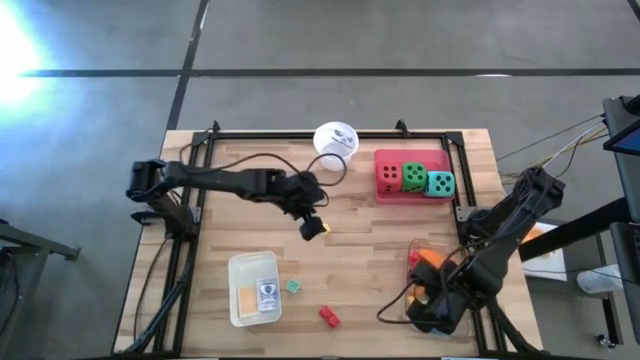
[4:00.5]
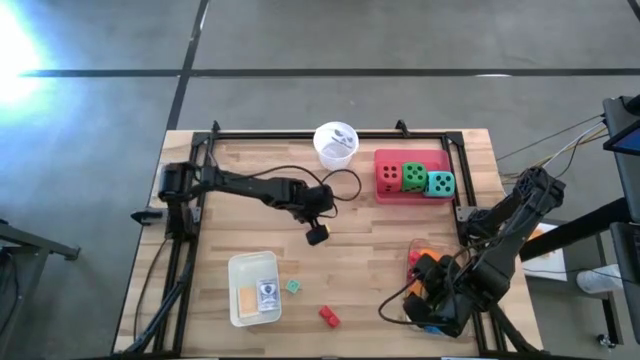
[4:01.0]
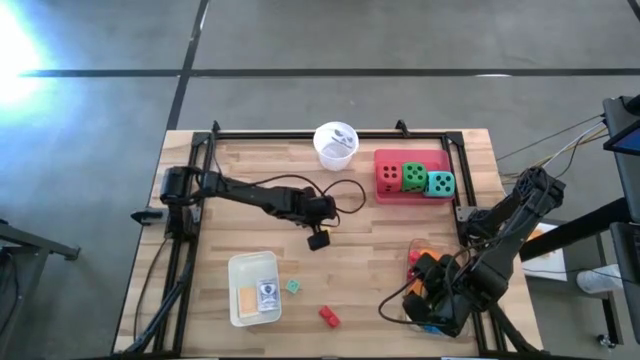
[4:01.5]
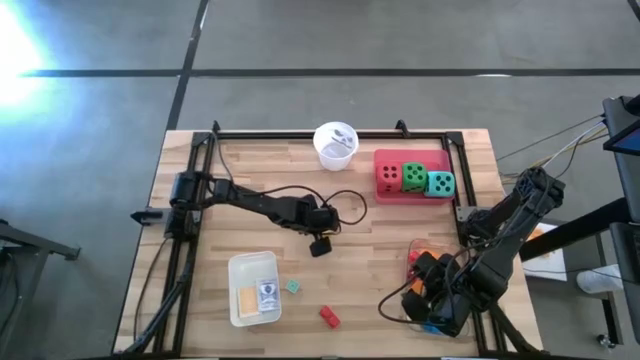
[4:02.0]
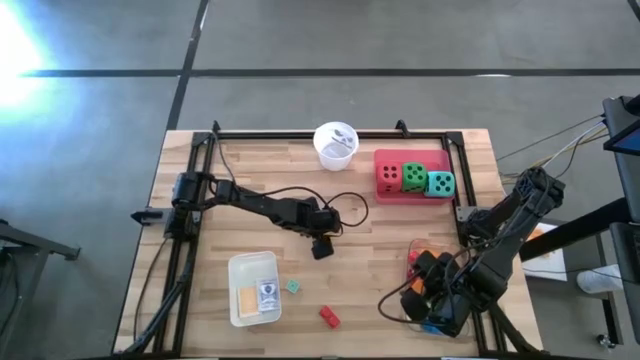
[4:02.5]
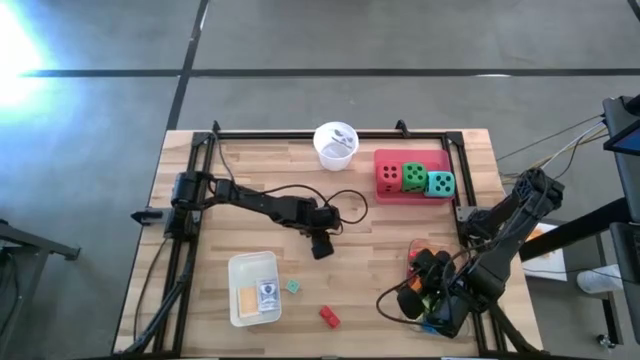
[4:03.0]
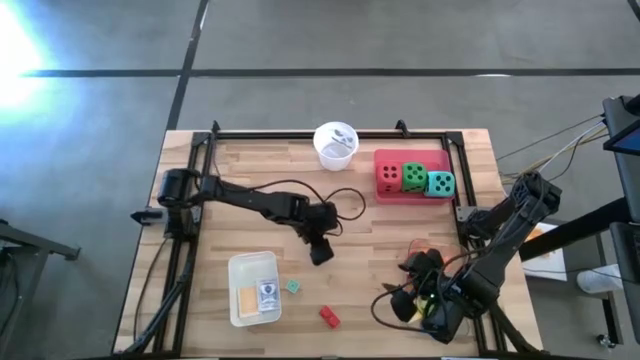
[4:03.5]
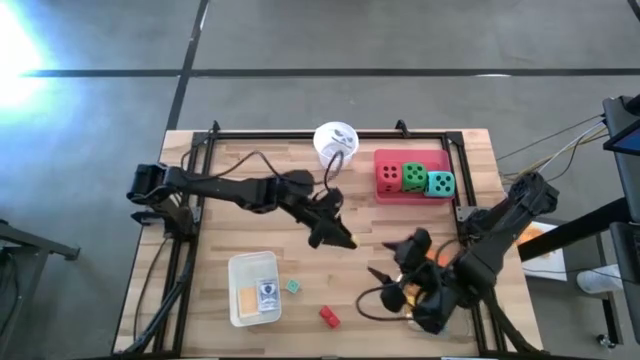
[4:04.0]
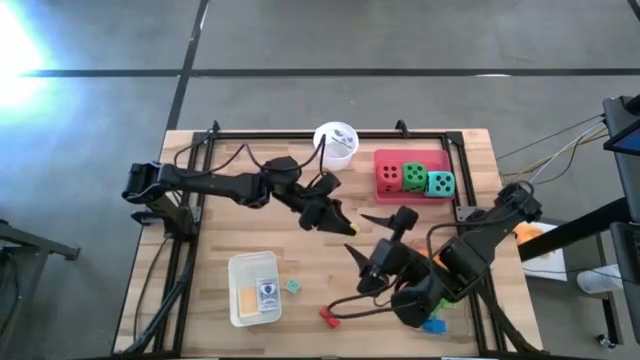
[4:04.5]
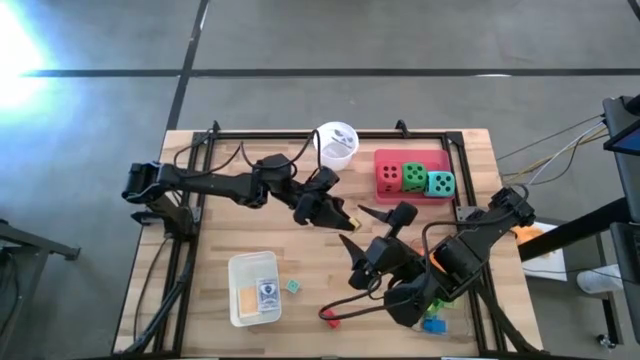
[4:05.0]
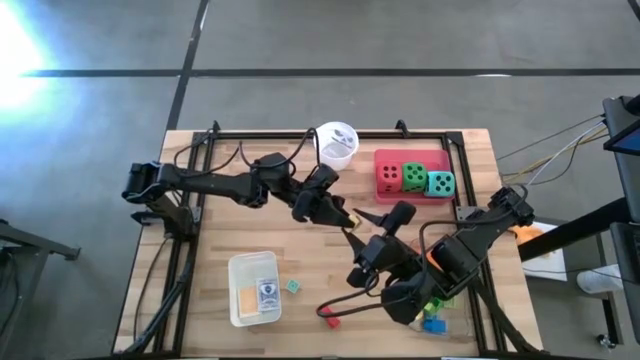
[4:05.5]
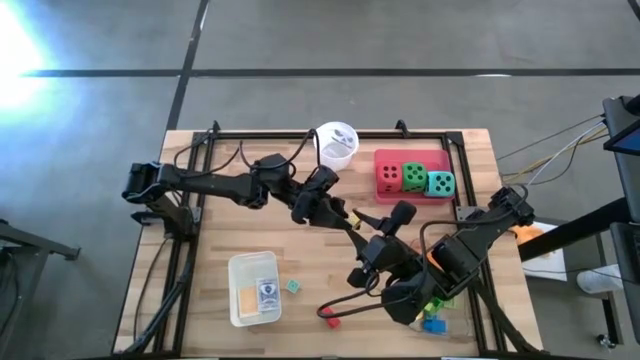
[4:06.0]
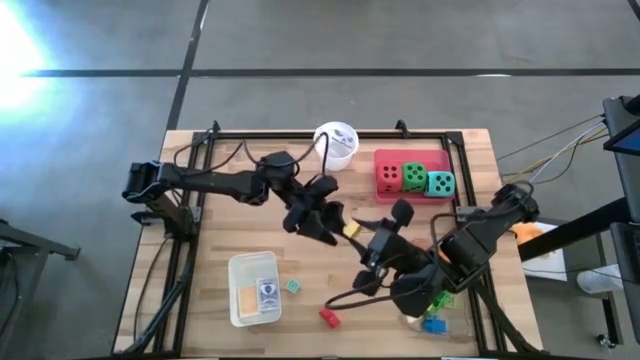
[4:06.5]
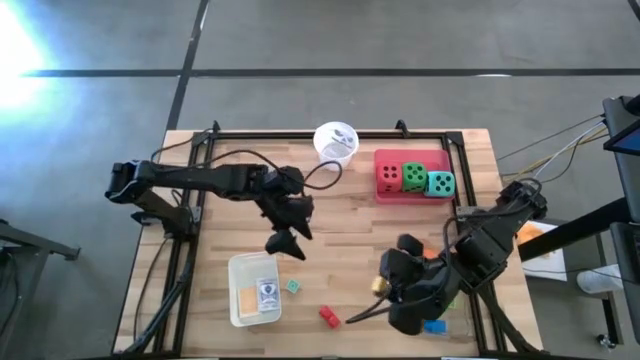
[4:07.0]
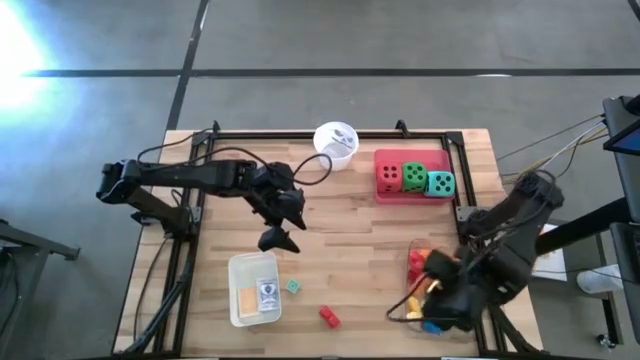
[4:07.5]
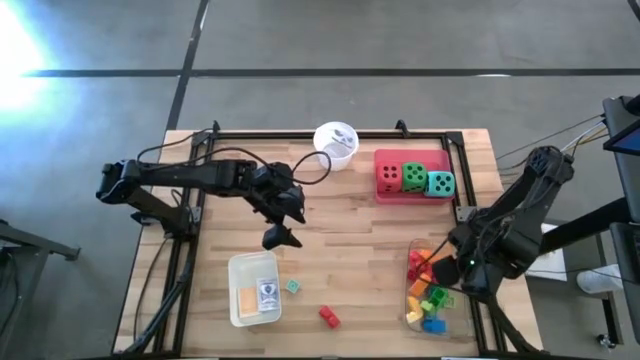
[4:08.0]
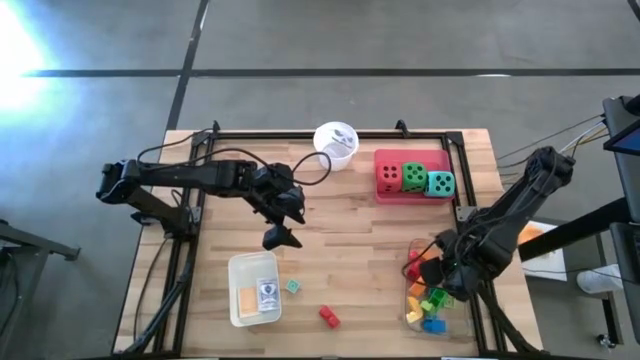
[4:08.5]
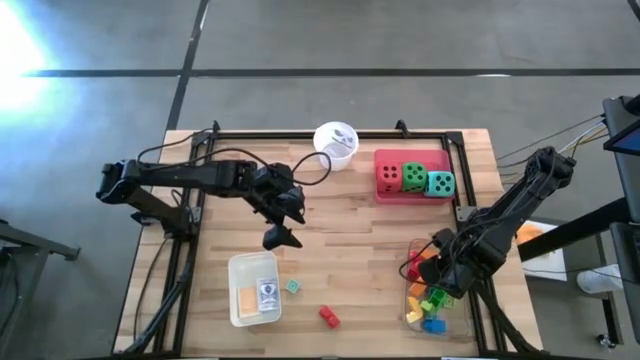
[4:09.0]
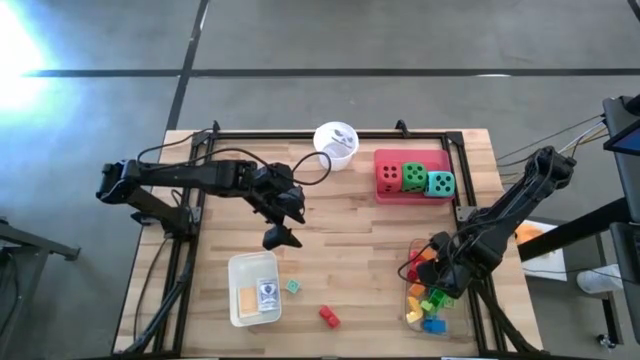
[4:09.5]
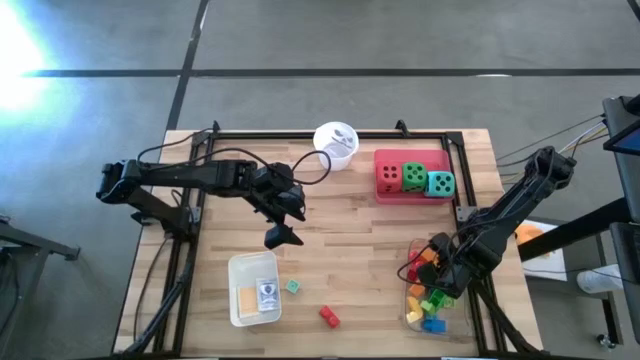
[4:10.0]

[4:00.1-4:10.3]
Task: Pick & Place Toys
Put the light yellow game piece into the transparent bin

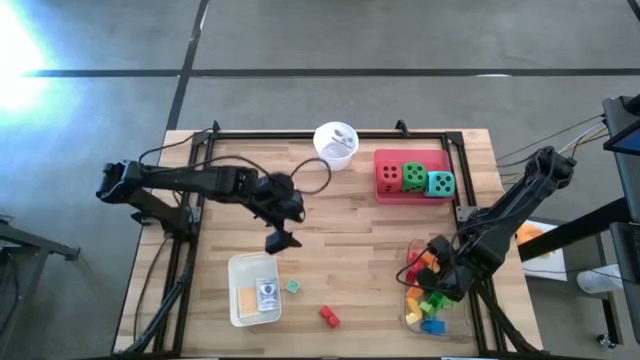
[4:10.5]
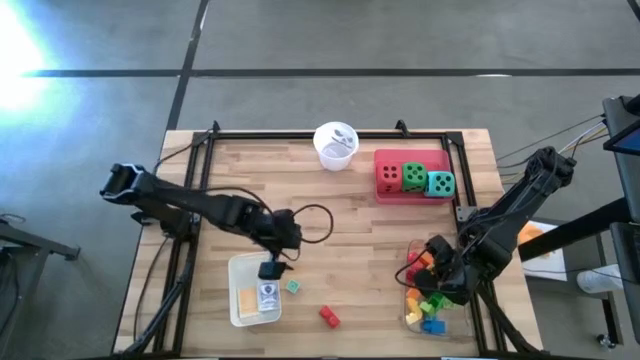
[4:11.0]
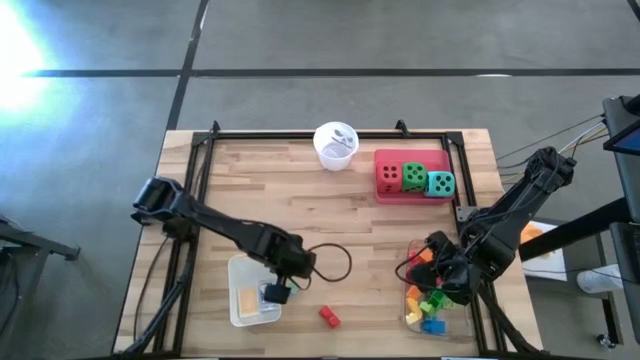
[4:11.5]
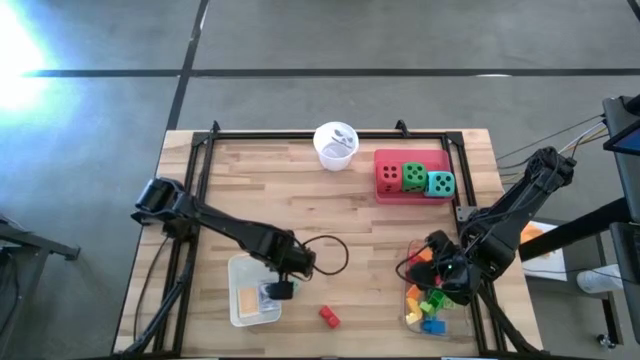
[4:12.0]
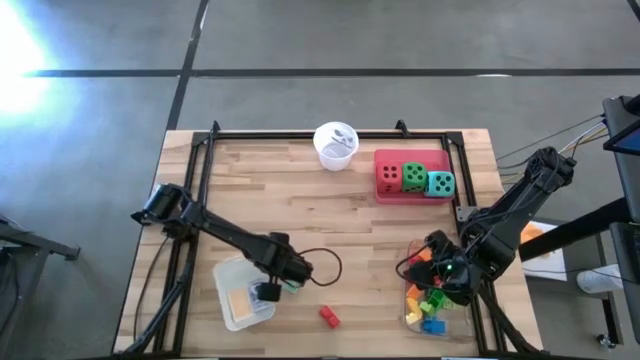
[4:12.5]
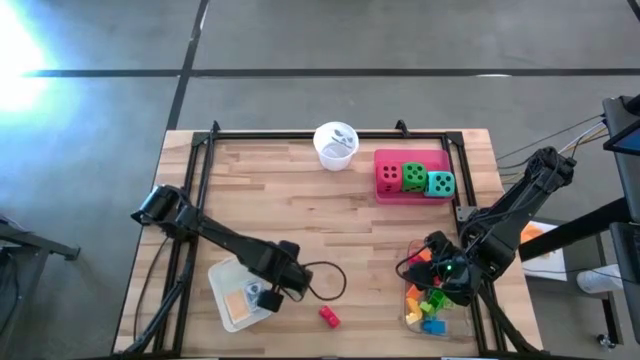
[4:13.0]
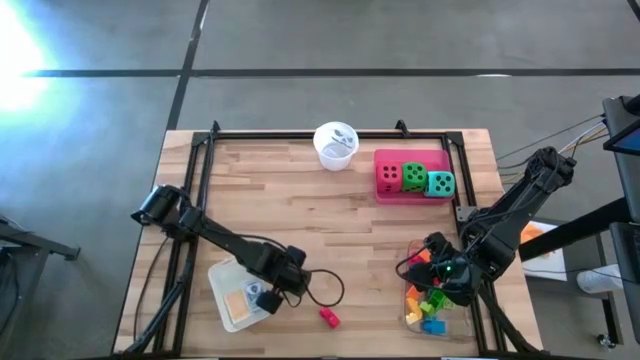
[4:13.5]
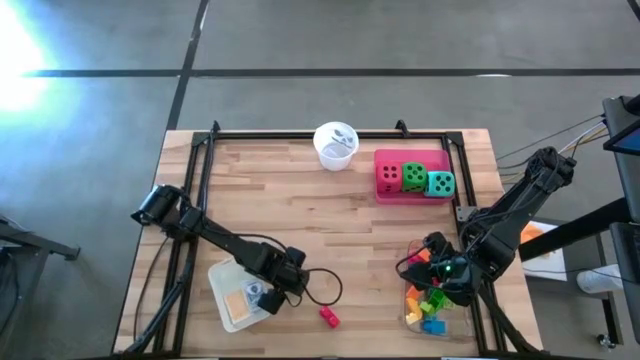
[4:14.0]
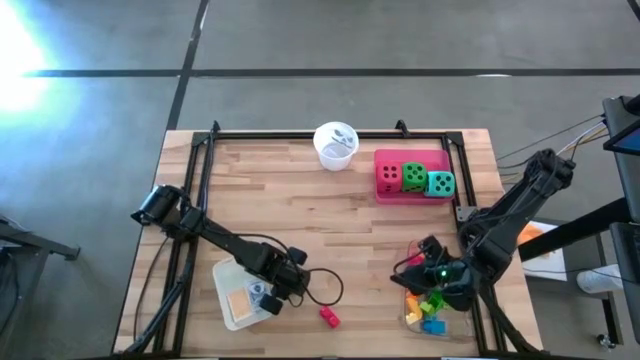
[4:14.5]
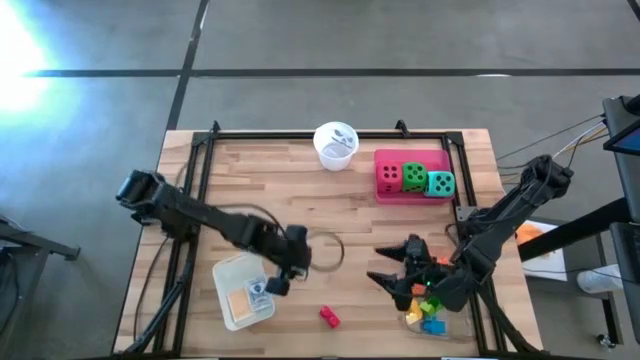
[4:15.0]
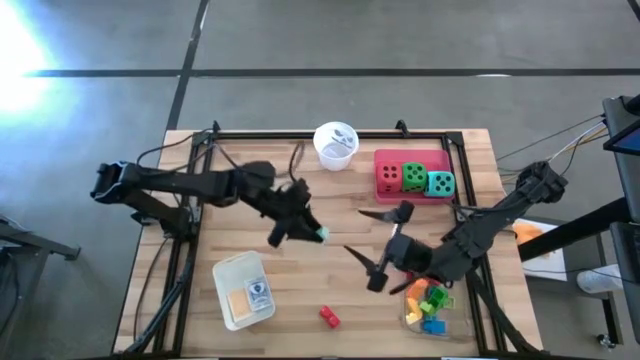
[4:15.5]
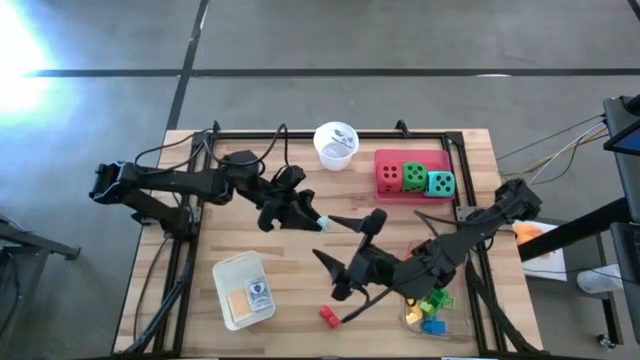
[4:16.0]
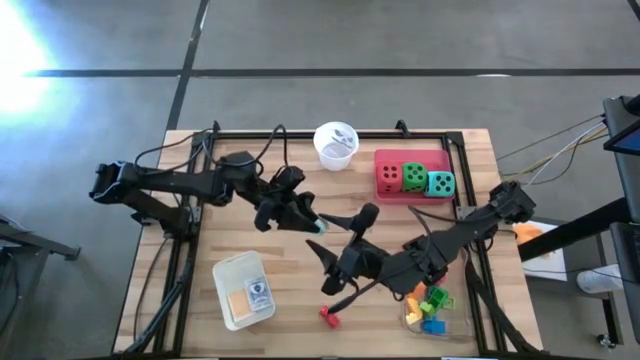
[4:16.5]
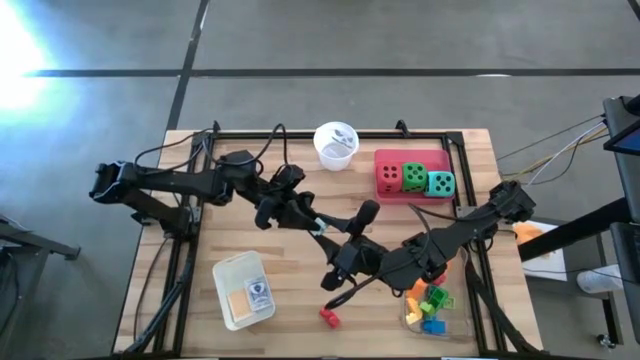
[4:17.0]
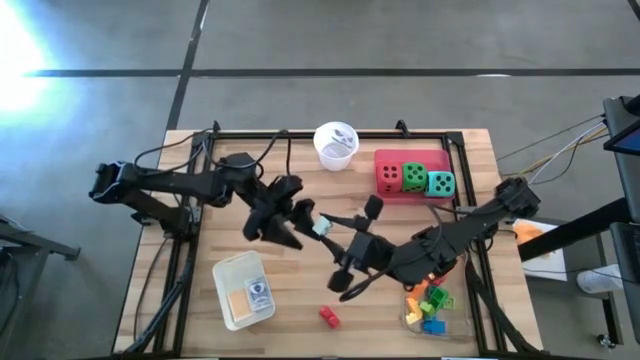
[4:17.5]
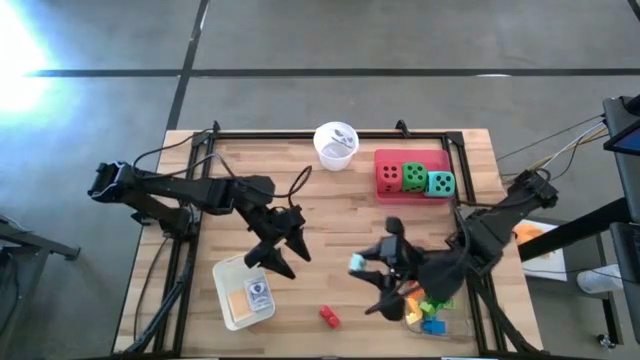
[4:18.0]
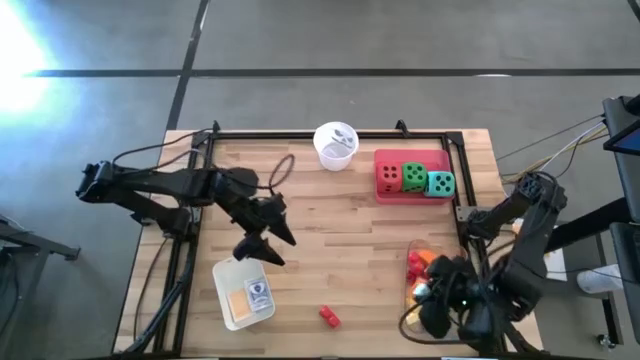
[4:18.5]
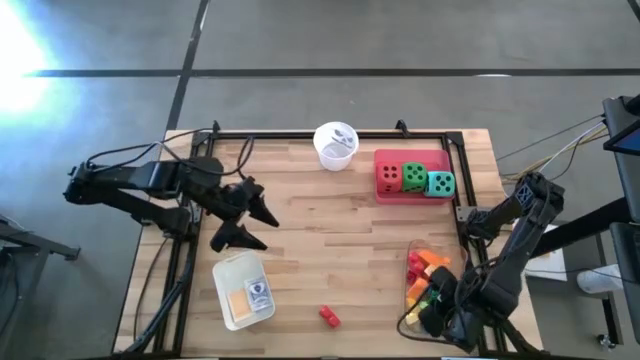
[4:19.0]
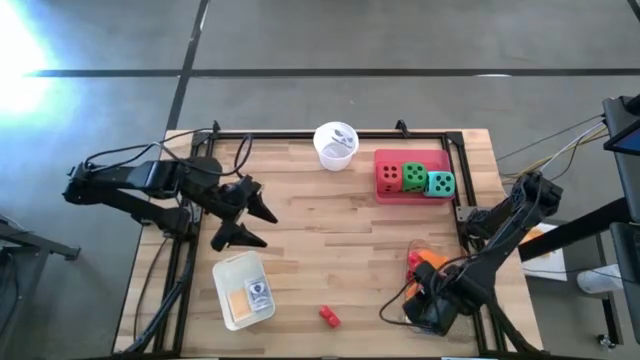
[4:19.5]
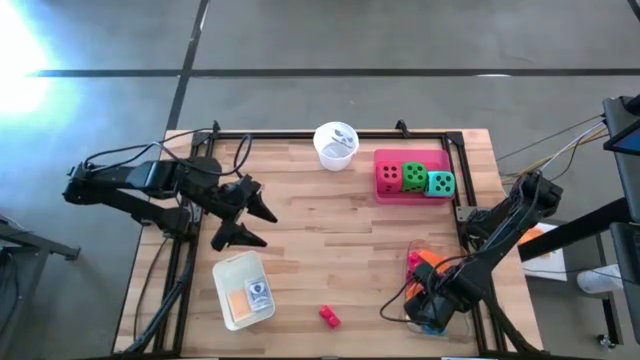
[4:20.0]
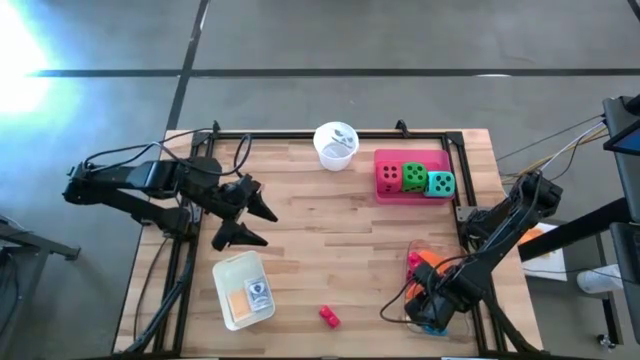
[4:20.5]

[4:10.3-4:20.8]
Put the light blue game piece into the transparent bin
